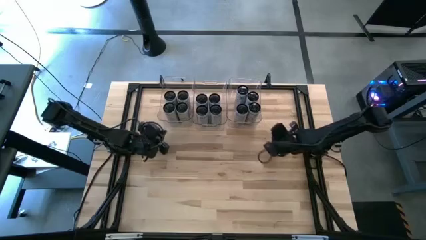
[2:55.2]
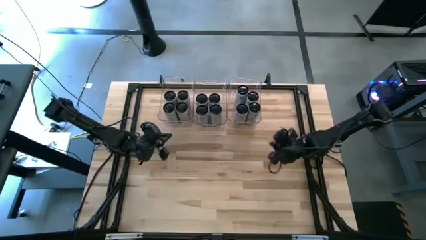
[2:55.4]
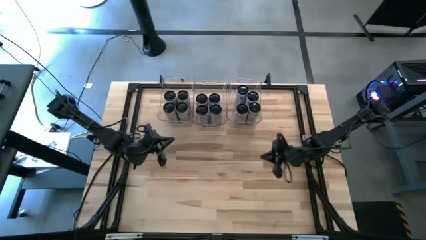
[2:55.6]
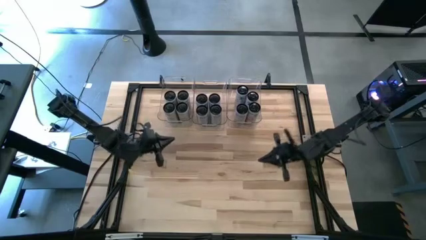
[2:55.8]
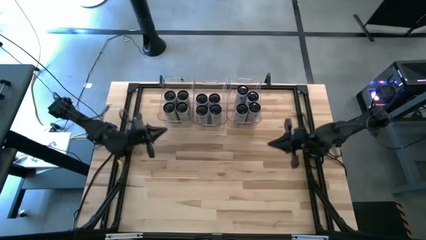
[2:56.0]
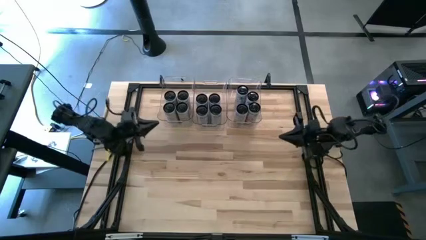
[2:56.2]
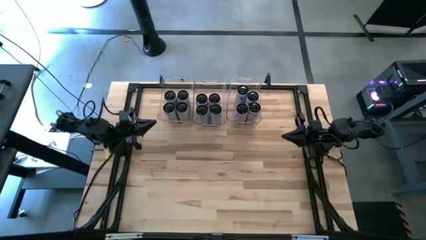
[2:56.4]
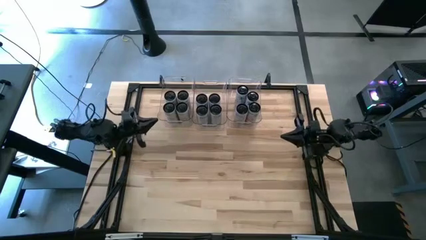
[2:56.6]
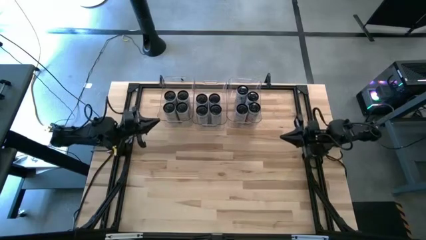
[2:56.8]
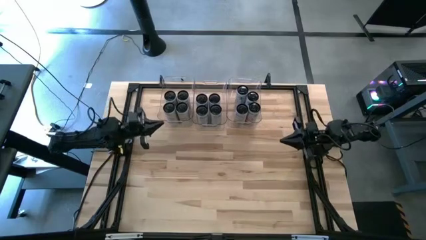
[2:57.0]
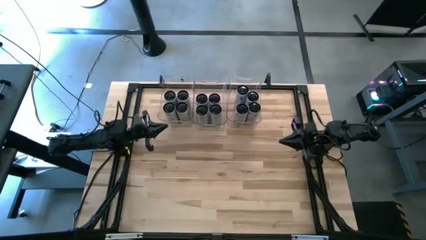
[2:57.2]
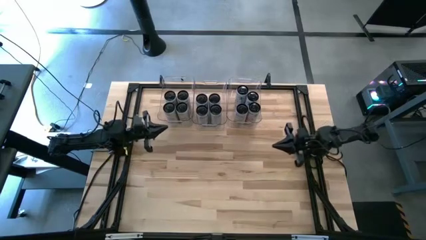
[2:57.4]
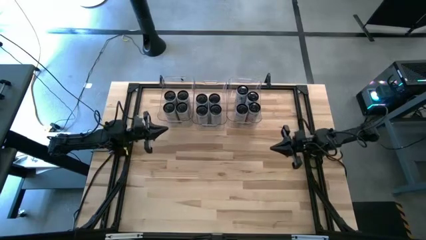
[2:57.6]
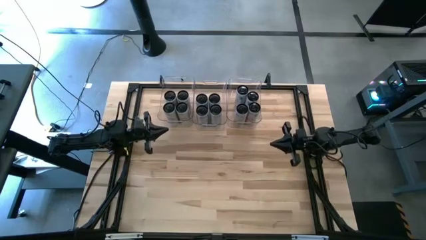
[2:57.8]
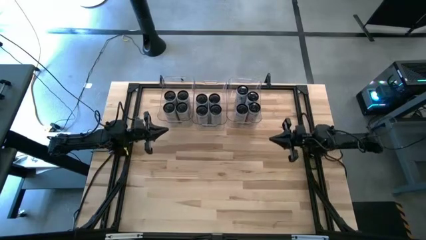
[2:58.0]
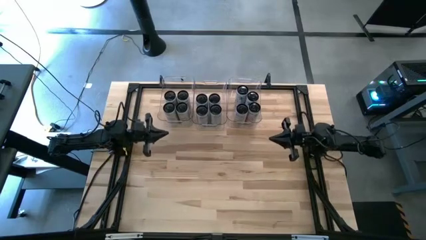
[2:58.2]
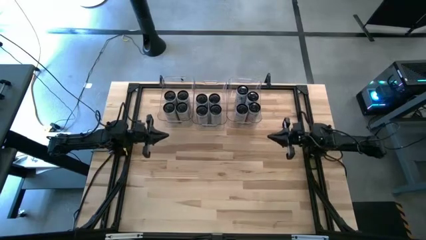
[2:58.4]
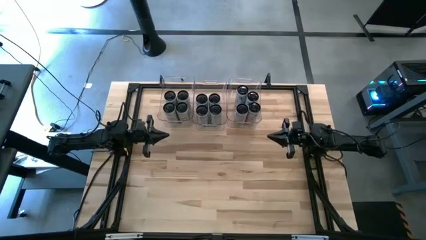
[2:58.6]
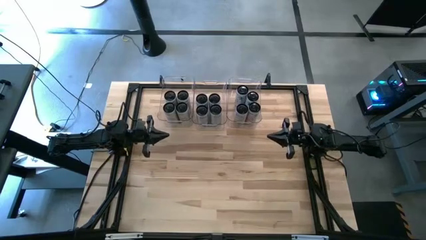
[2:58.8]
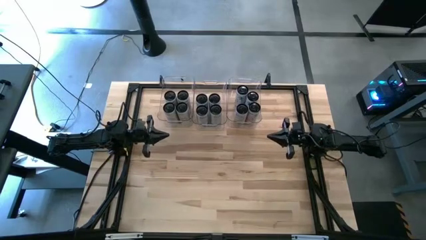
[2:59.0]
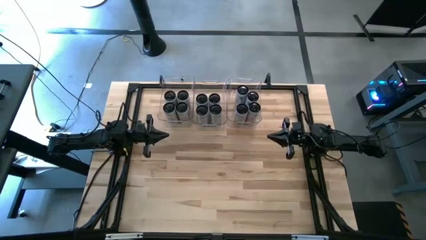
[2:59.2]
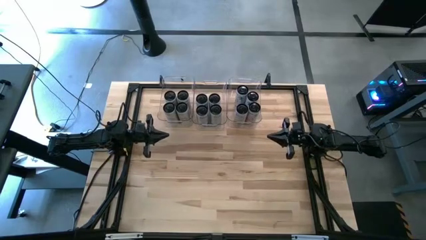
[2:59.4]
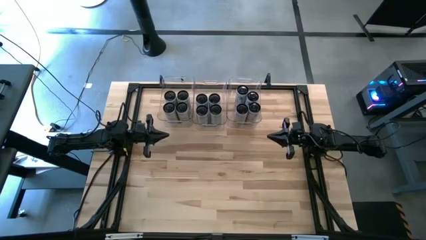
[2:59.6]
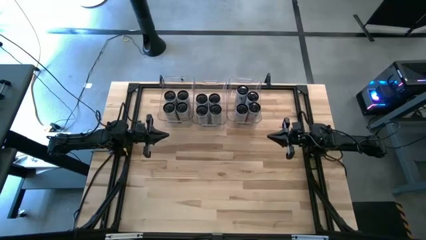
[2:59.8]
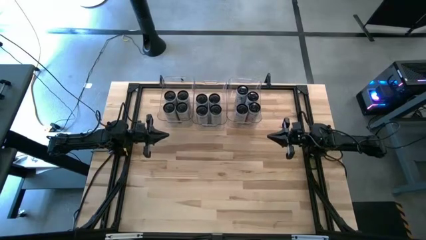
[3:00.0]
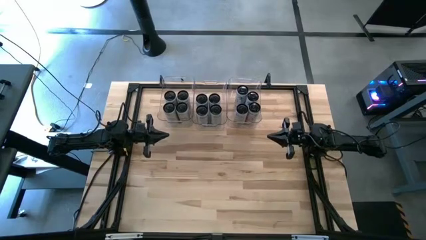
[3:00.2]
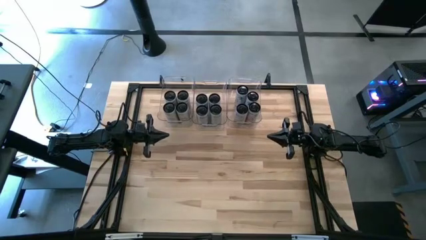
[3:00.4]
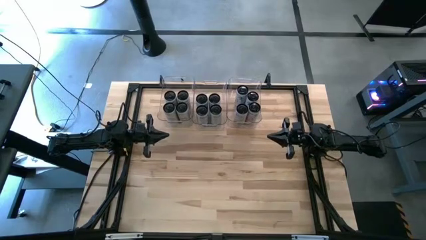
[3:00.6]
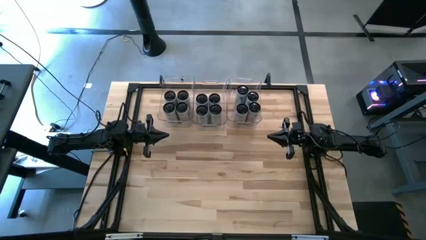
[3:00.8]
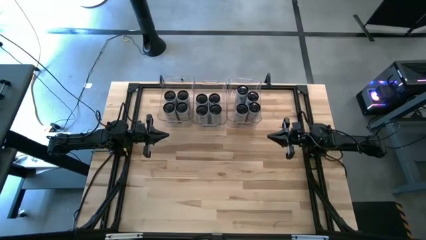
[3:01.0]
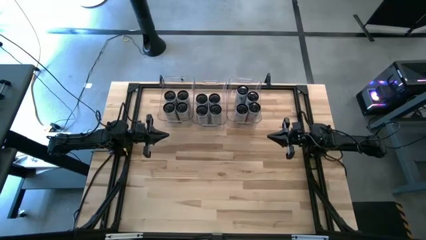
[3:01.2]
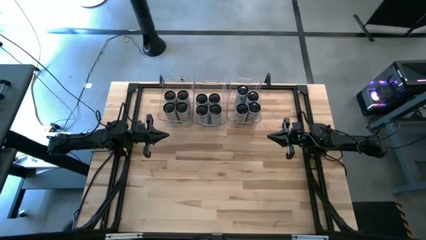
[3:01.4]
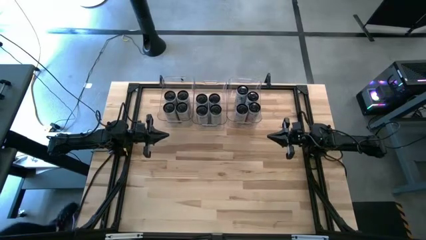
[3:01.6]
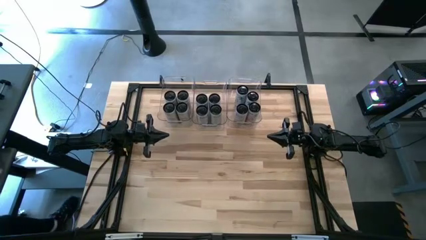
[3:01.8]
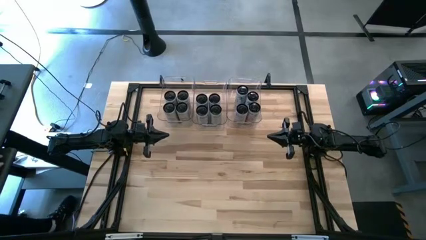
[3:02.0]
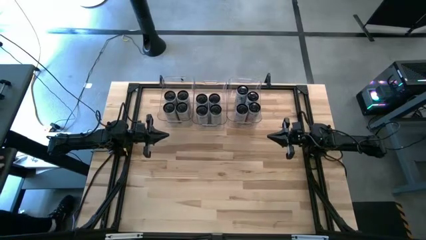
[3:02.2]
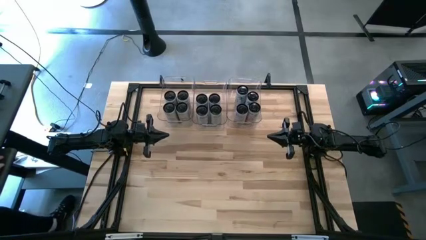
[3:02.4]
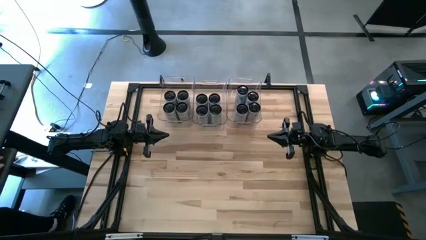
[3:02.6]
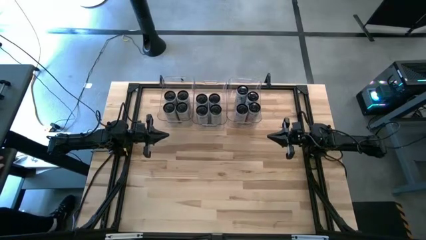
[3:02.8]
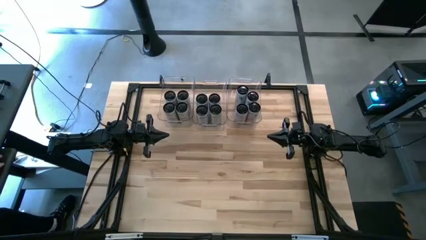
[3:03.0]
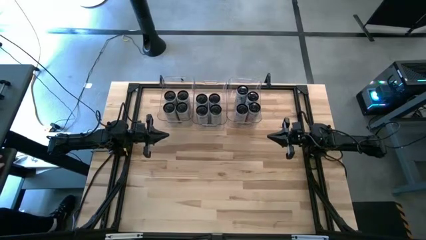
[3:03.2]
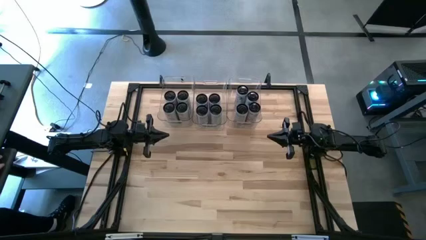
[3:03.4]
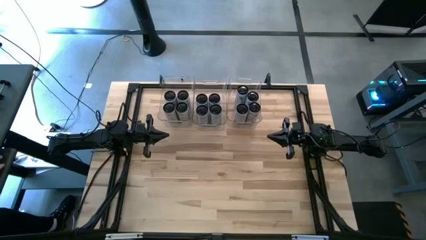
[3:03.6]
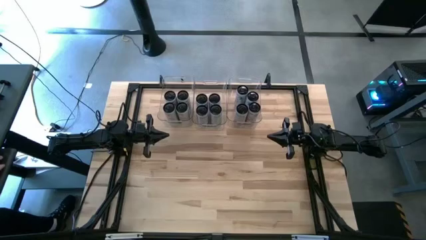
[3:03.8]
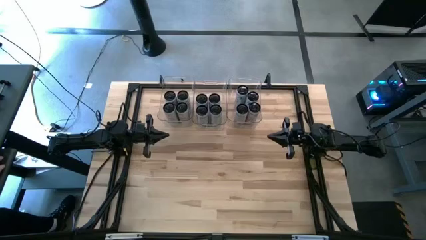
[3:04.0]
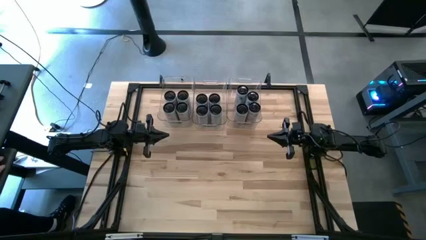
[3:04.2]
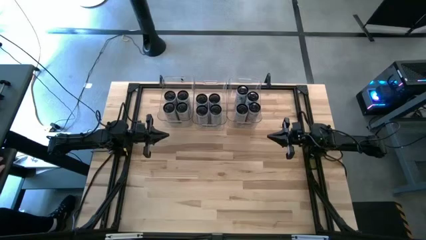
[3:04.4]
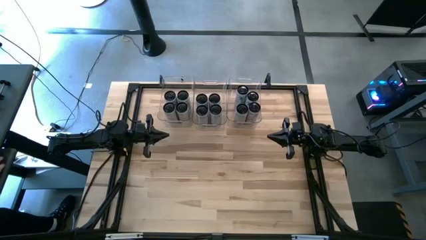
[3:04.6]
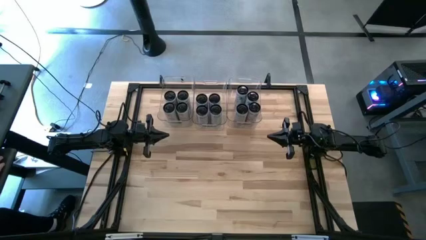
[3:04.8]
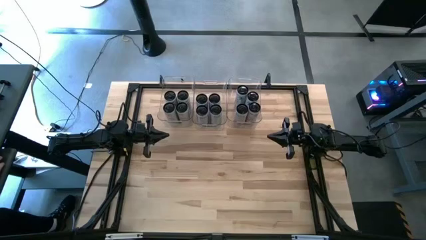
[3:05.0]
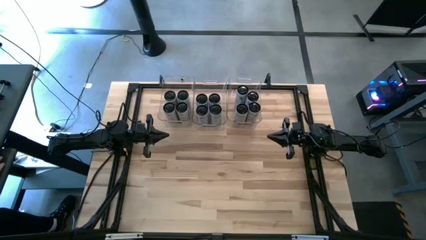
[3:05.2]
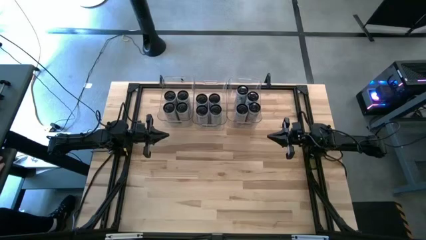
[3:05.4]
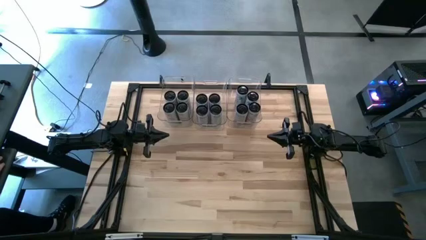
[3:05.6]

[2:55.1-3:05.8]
Task: Sort soda cans
Return to Home Position

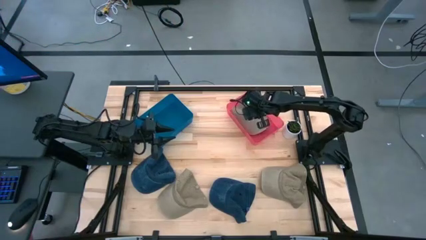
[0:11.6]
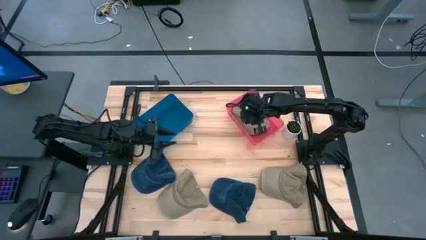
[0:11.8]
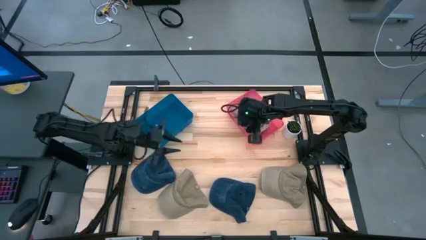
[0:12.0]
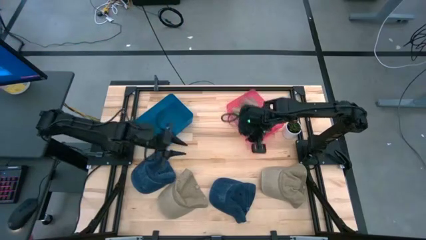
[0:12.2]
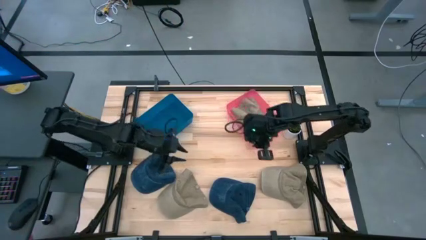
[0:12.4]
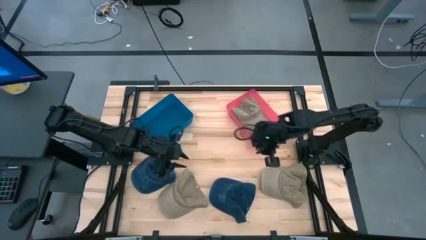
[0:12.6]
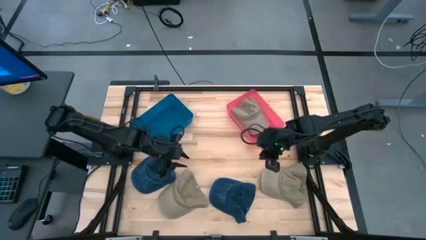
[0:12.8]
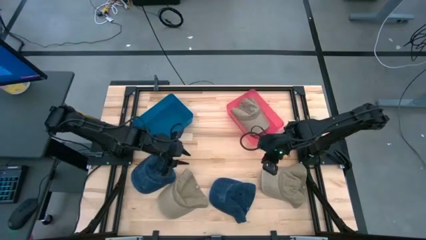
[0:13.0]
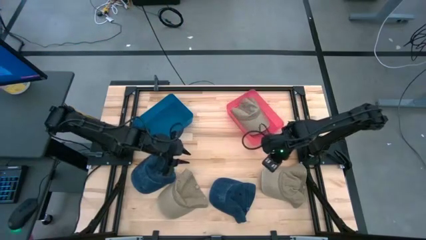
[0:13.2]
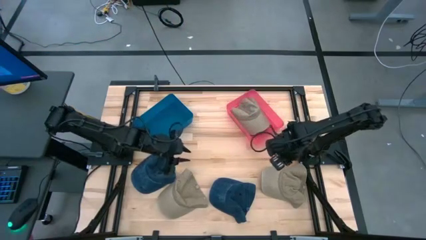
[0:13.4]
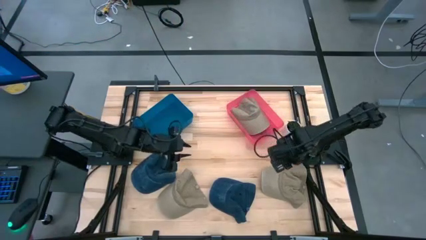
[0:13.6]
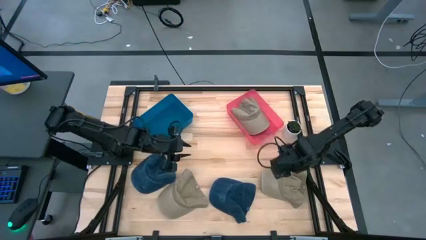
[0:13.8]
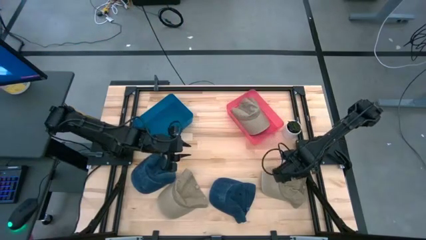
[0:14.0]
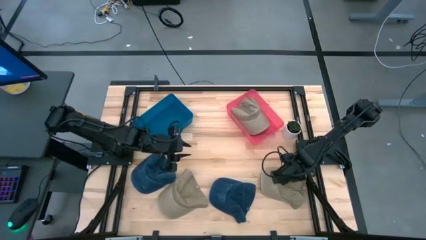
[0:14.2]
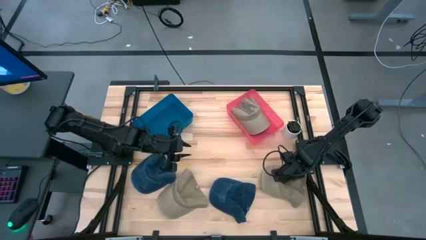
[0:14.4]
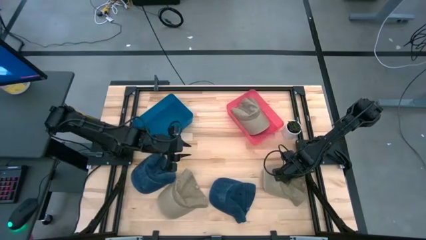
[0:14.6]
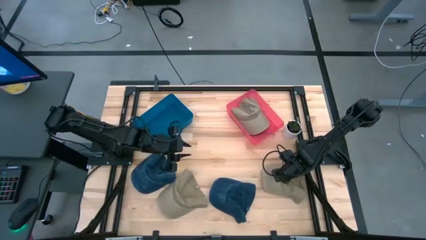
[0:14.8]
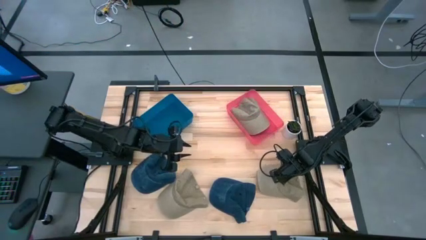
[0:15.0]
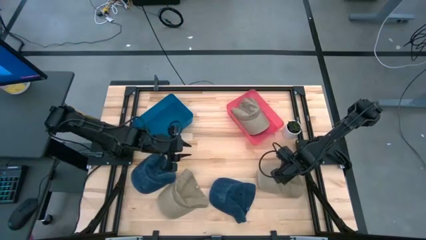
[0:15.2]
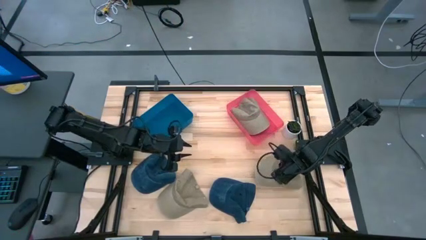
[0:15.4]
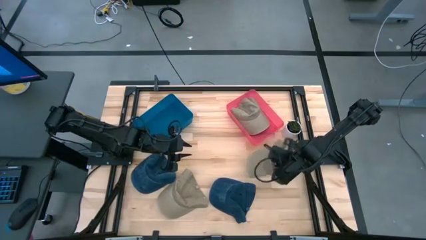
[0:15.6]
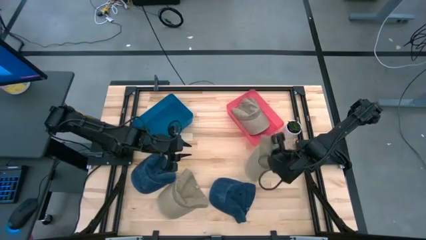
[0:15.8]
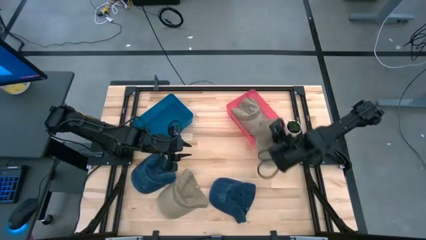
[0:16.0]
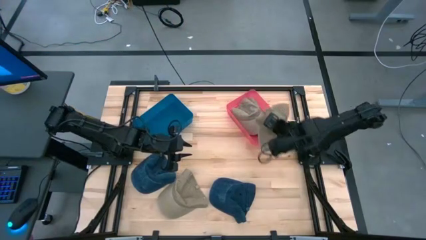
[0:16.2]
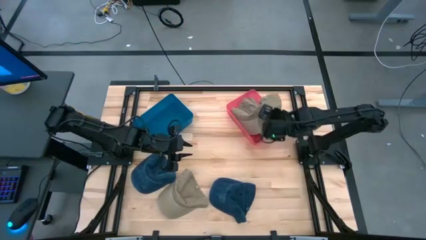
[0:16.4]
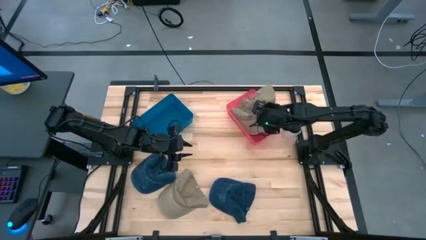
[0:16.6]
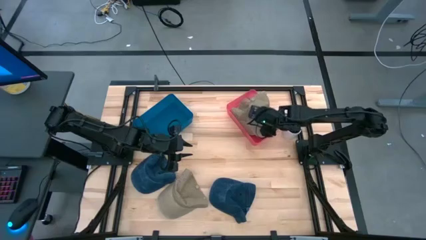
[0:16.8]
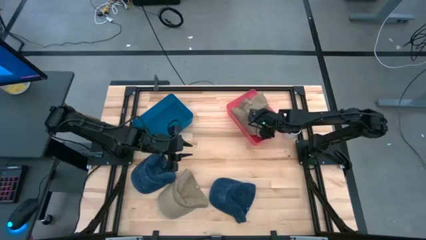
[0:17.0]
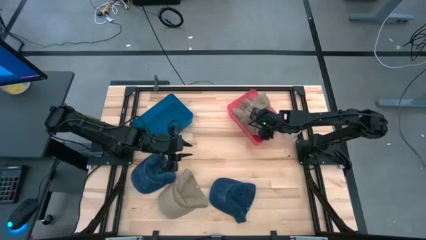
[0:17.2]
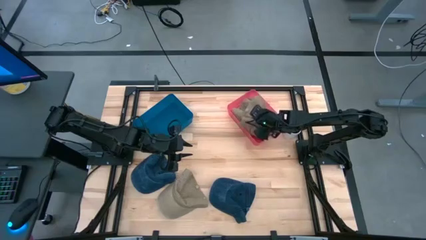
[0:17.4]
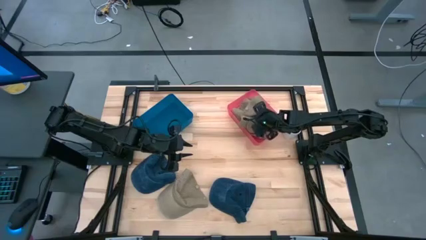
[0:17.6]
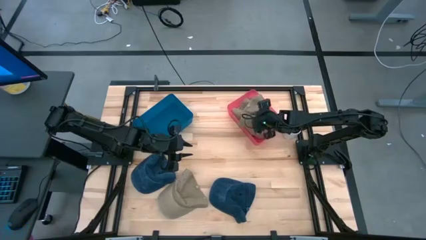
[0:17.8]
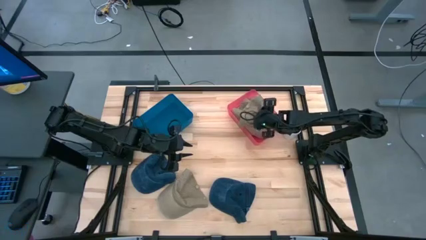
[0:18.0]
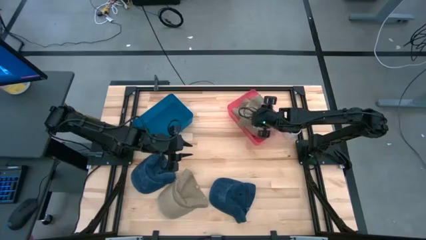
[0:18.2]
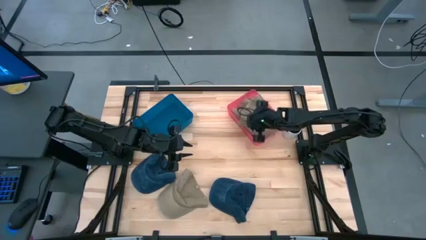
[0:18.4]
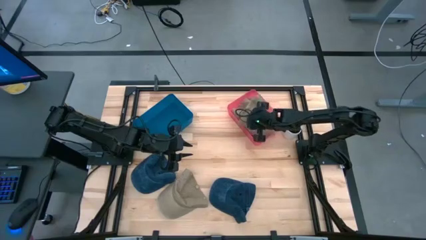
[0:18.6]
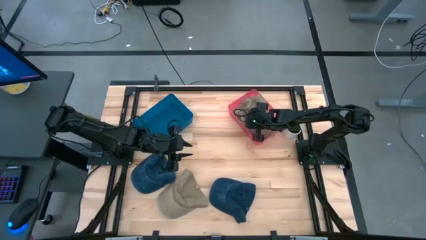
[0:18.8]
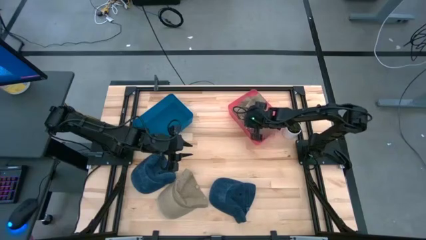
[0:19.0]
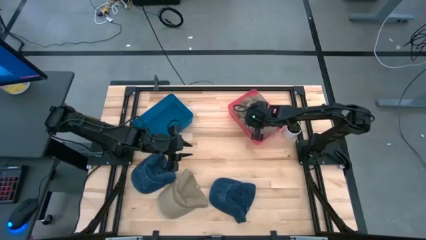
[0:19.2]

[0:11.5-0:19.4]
Task: Pick & Place hat
Put the right brown cap into the red bin
